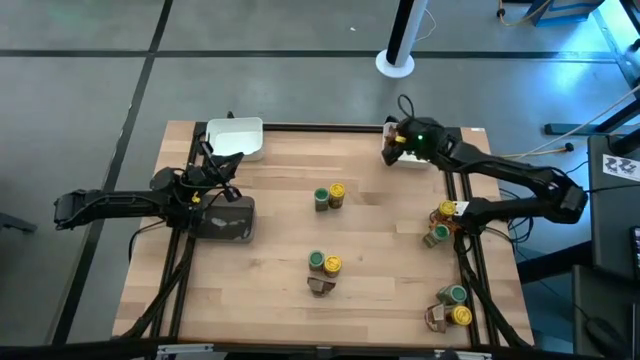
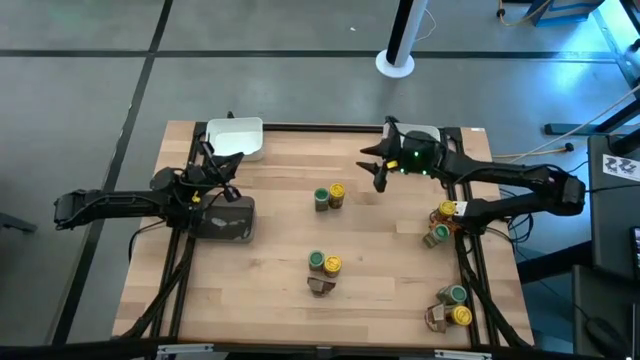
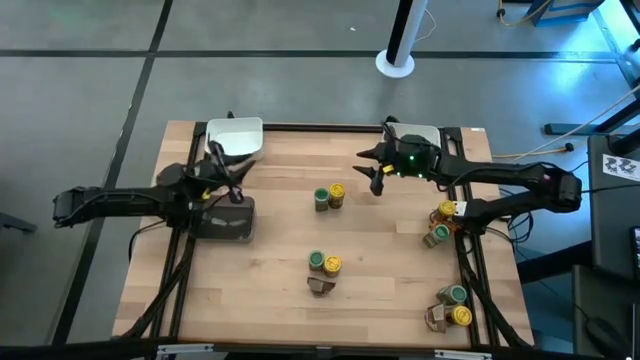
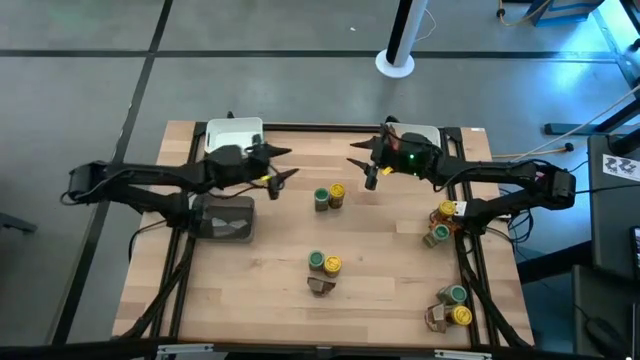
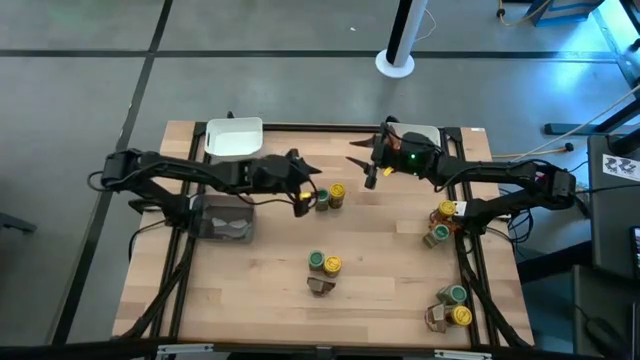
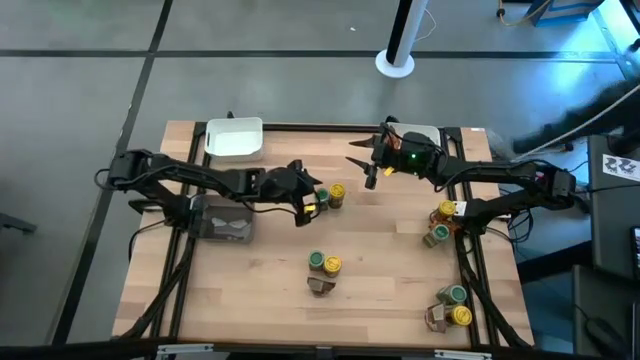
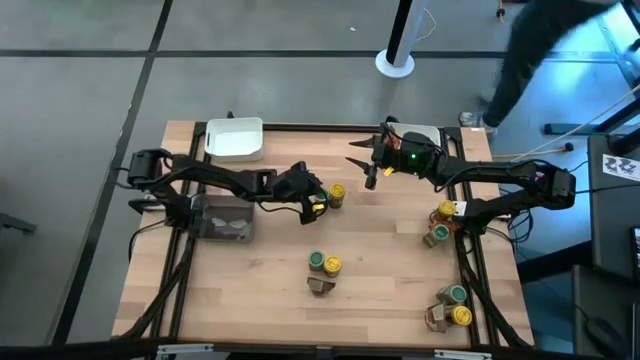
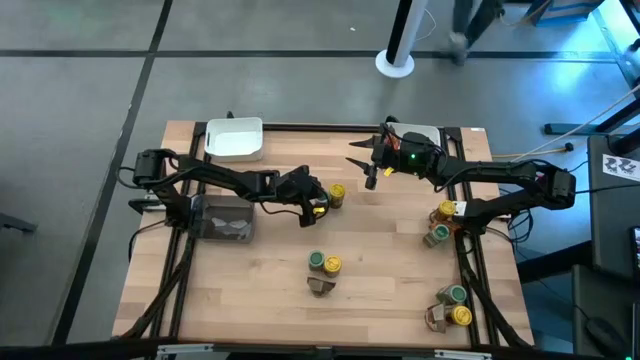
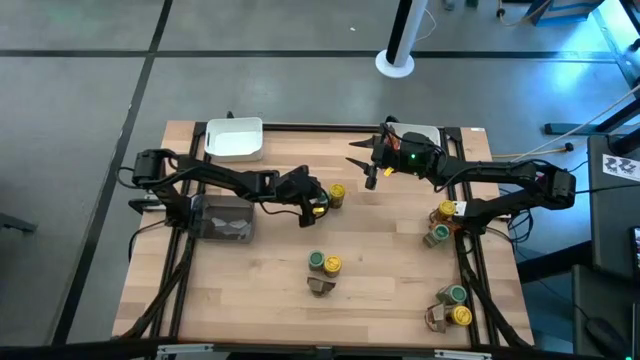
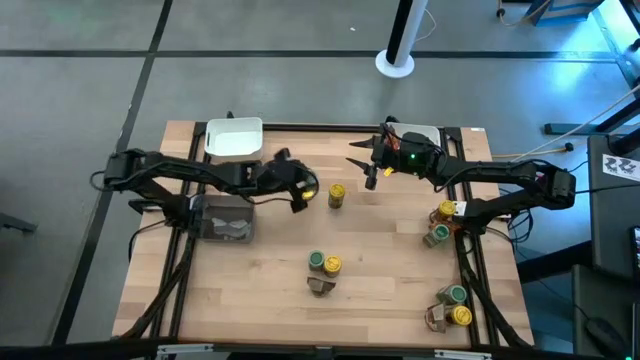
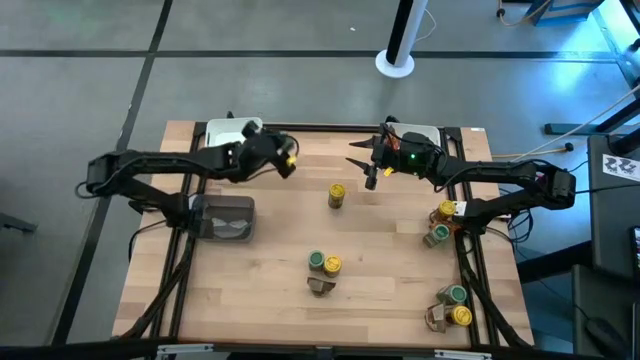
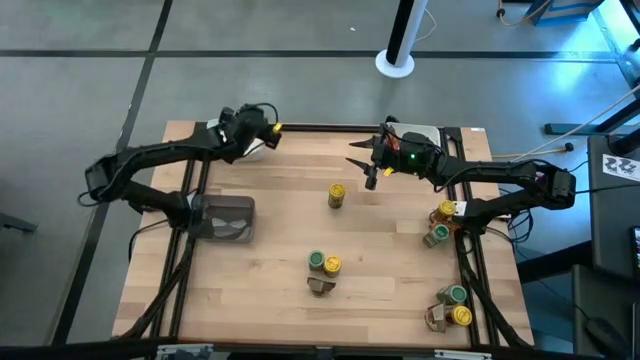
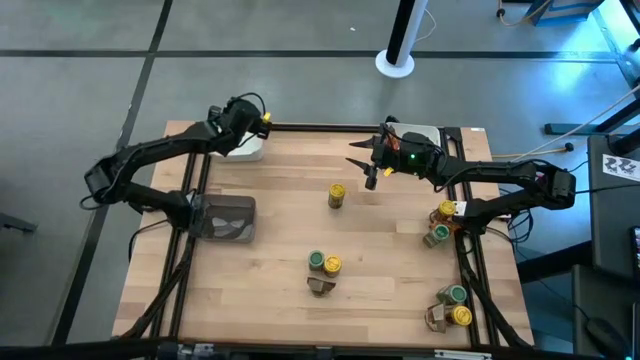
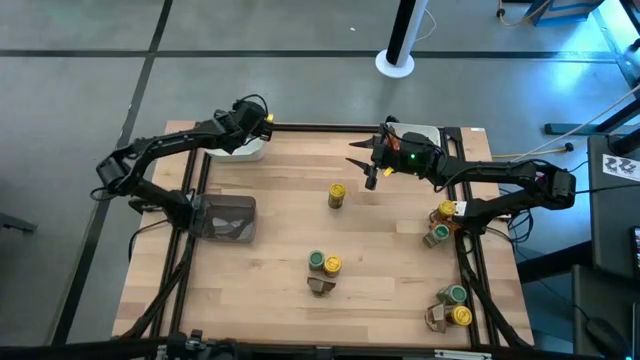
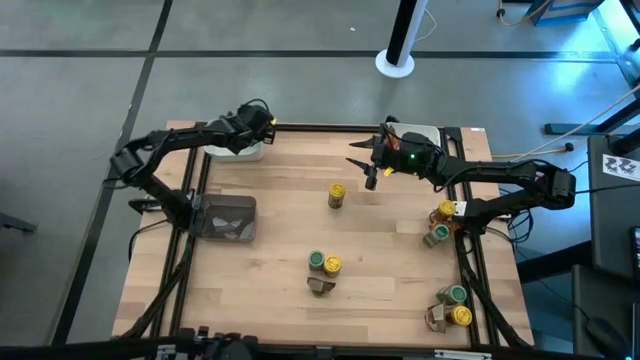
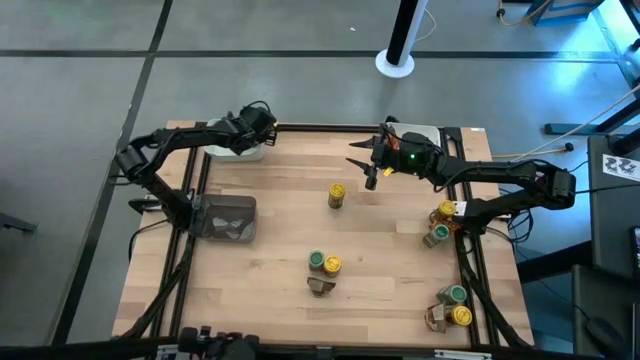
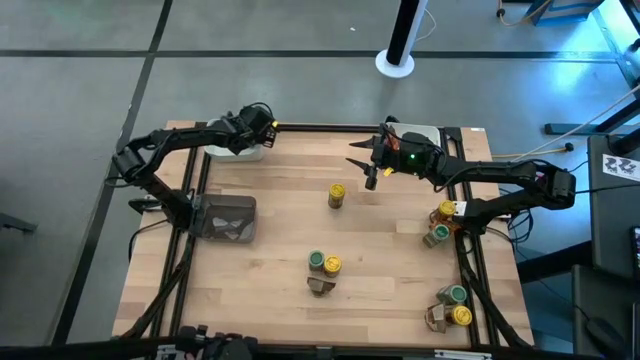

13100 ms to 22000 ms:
Task: Sort spices by type
Put the green seasoning bottle into the top left white bin

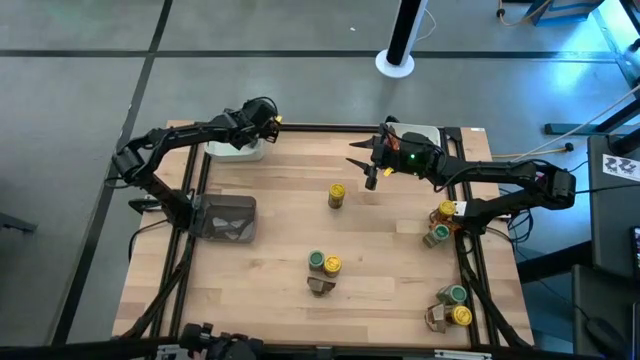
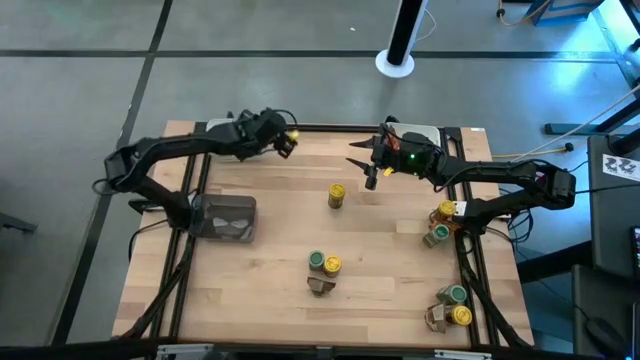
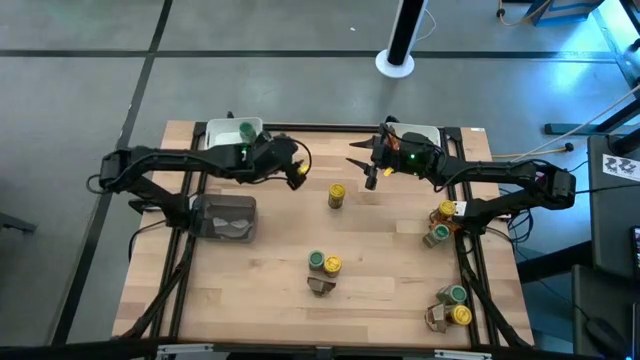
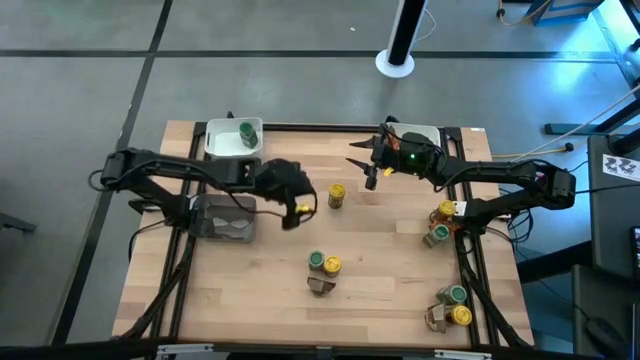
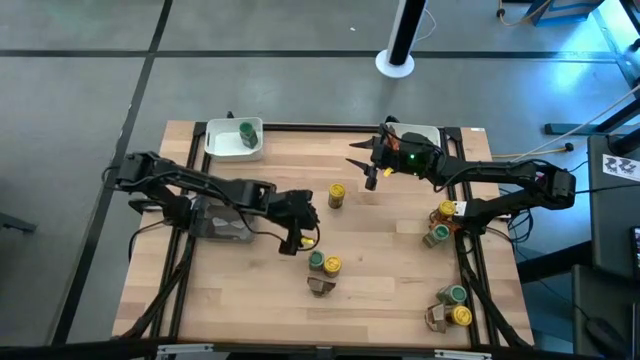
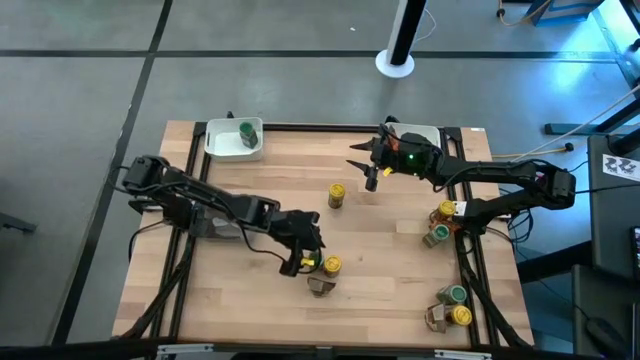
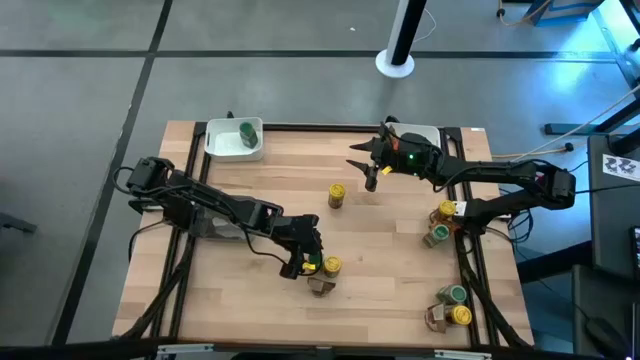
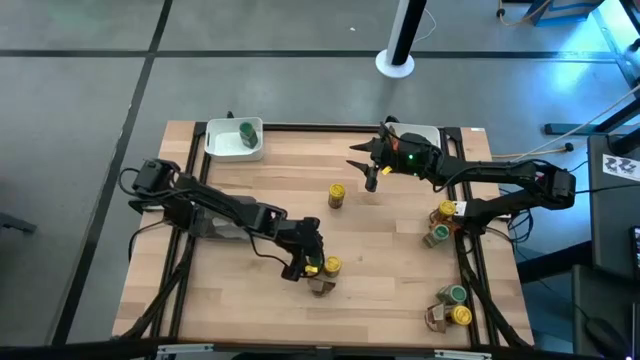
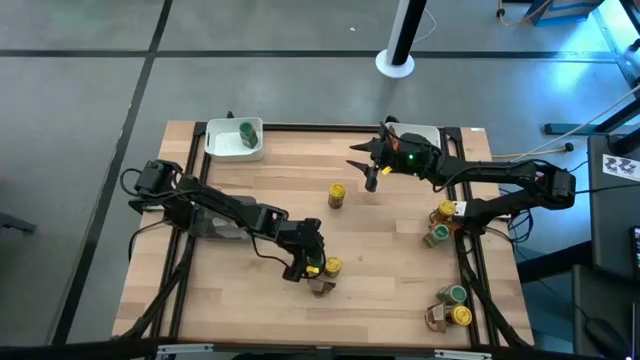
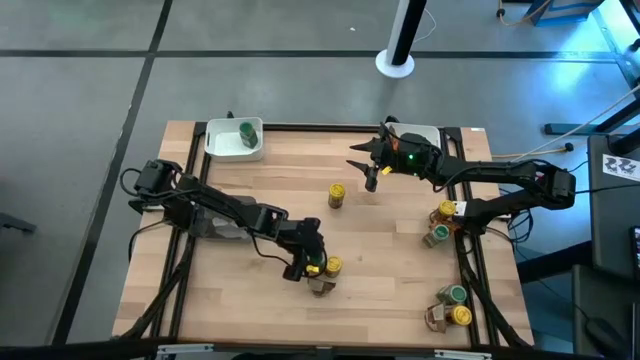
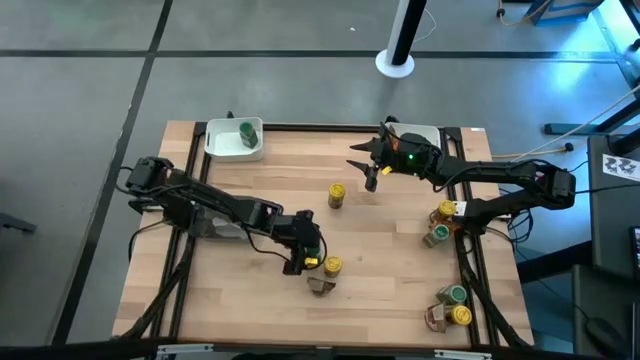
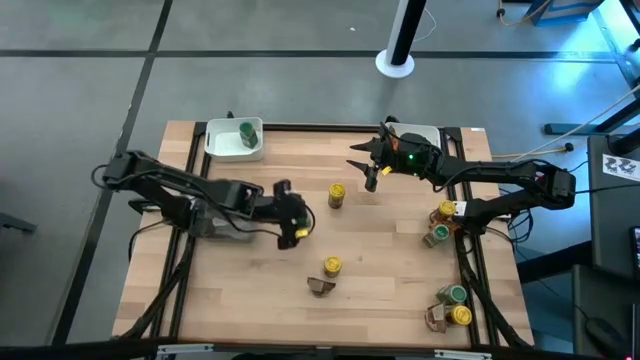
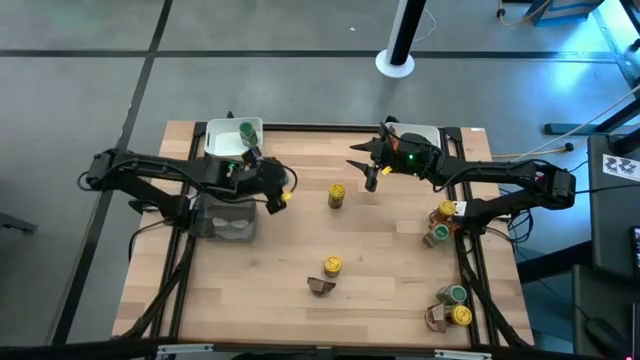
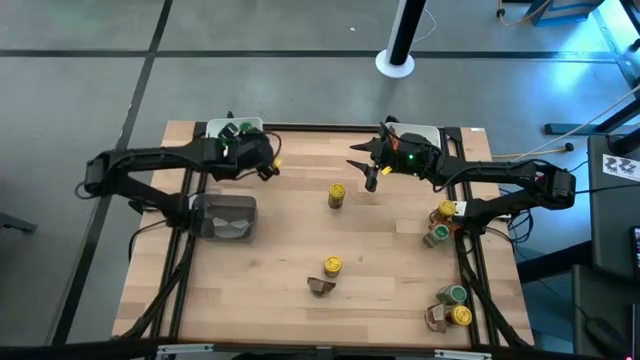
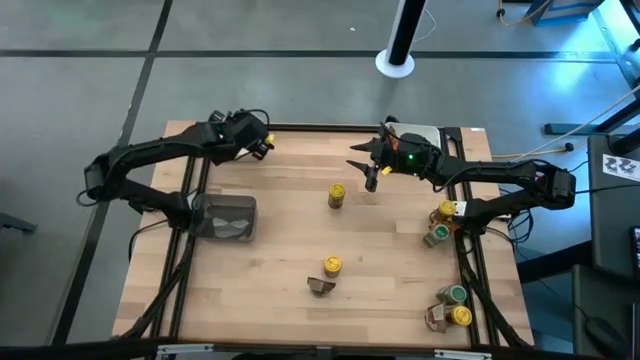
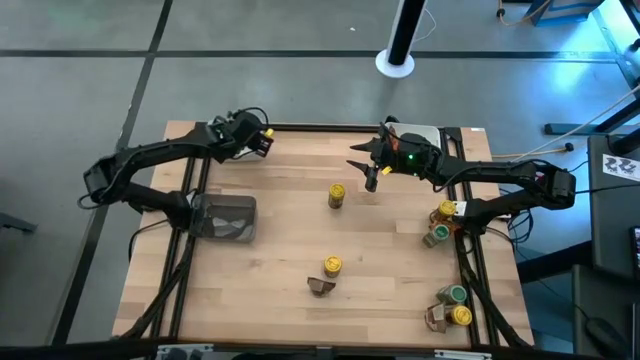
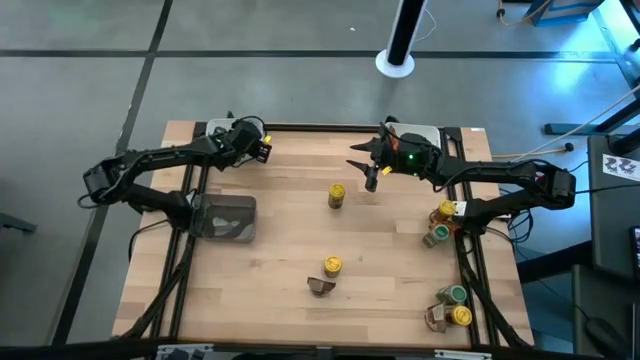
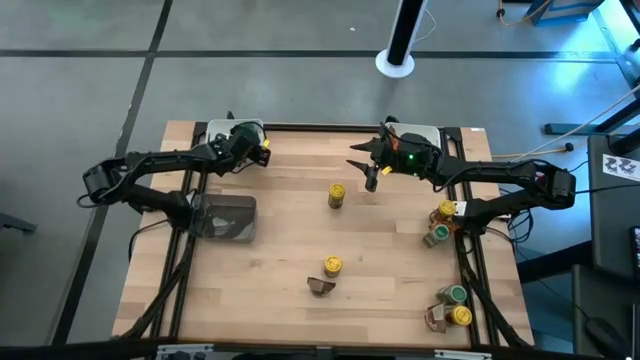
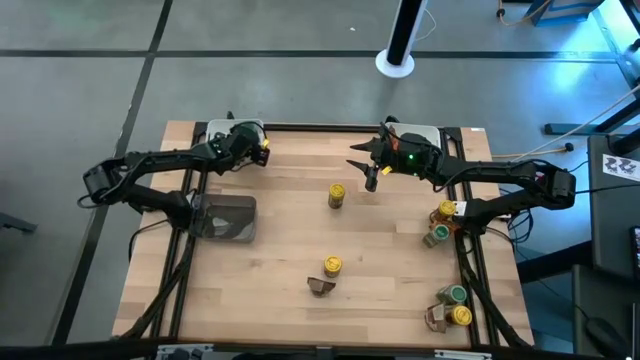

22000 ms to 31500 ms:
Put the green seasoning bottle into the top left white bin

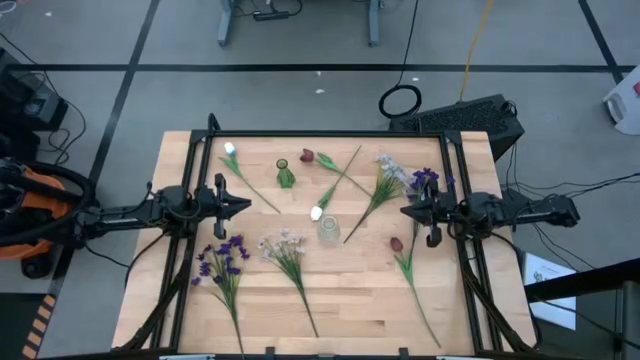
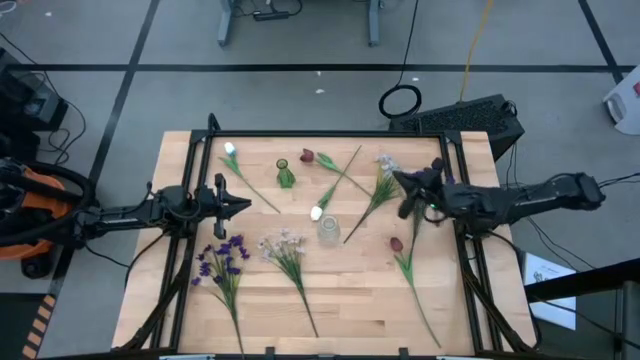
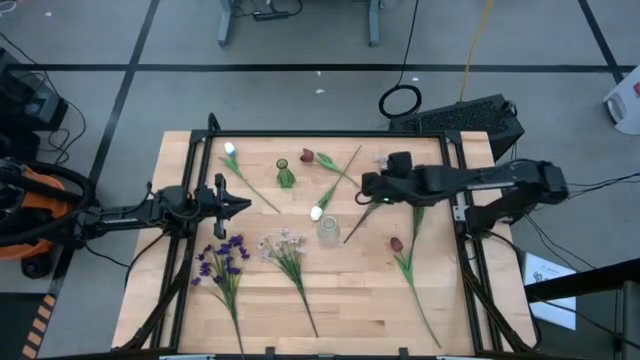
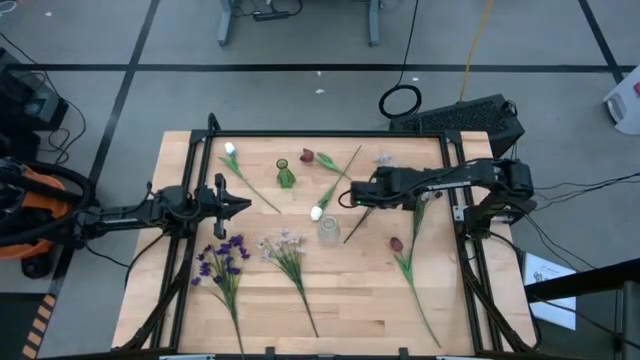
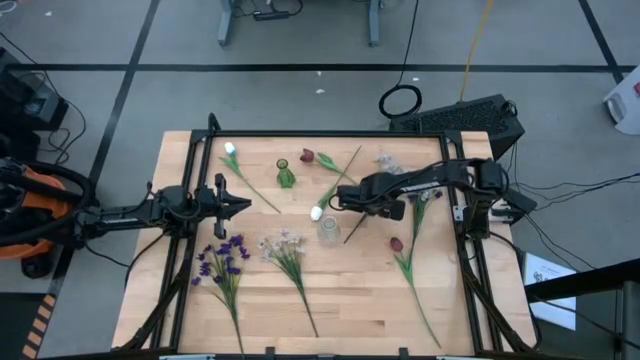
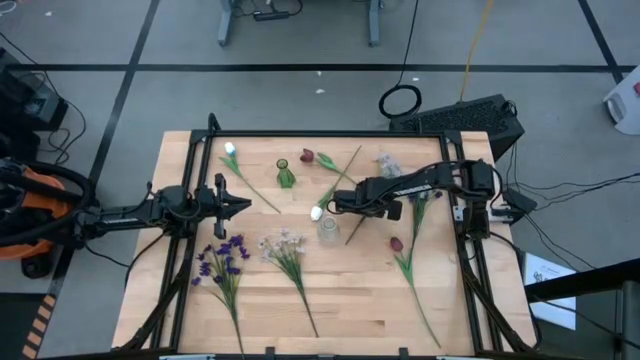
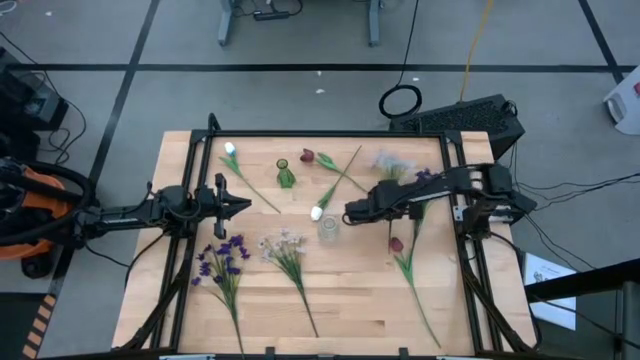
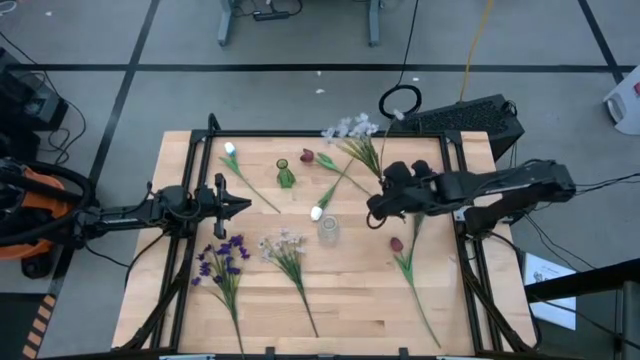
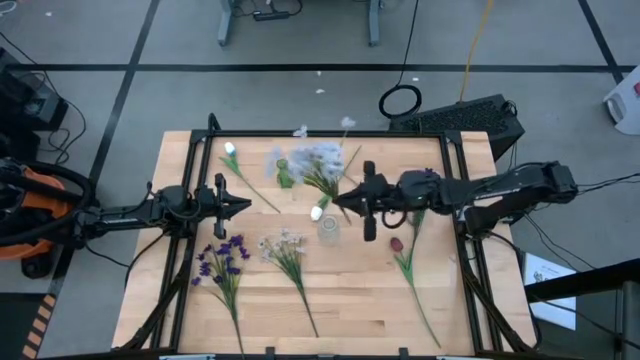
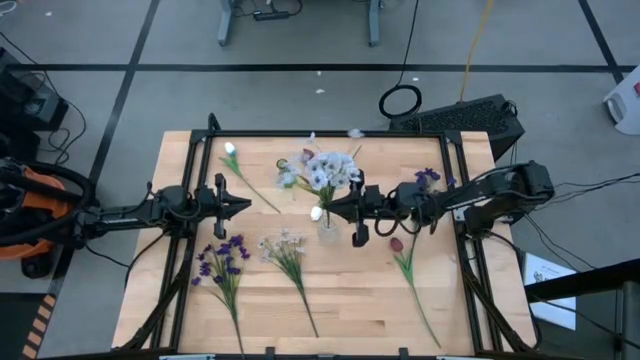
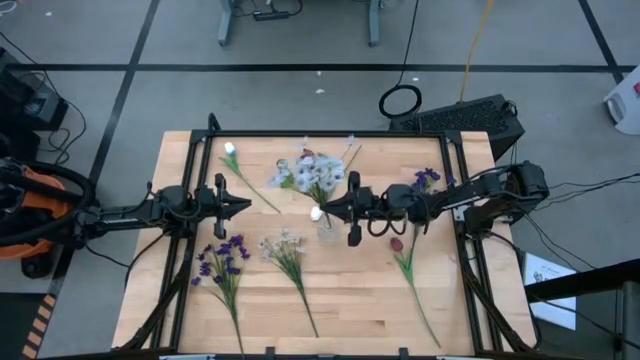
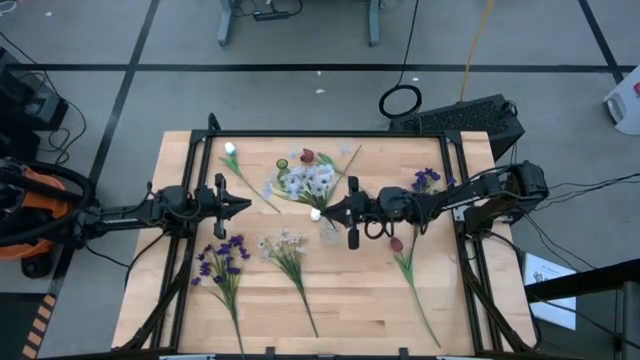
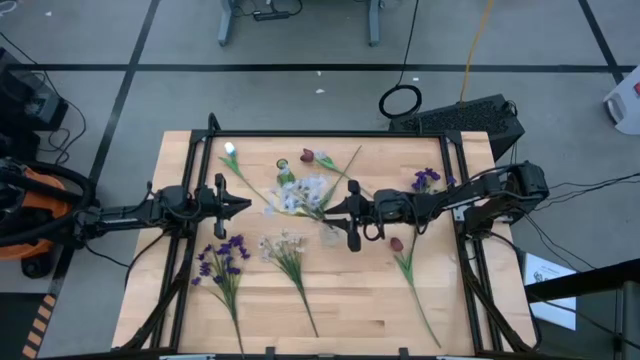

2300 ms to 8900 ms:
Task: Sort flowers into vase by color
Put the top white flowers into the transparent vase
